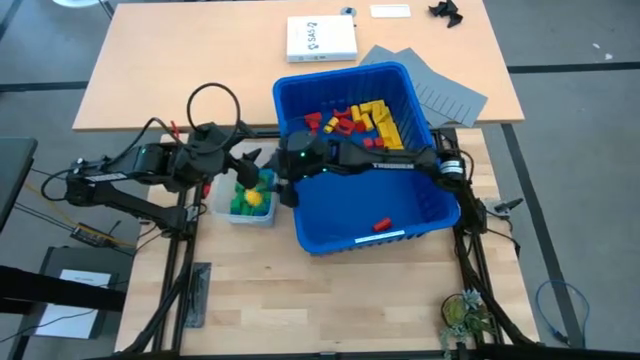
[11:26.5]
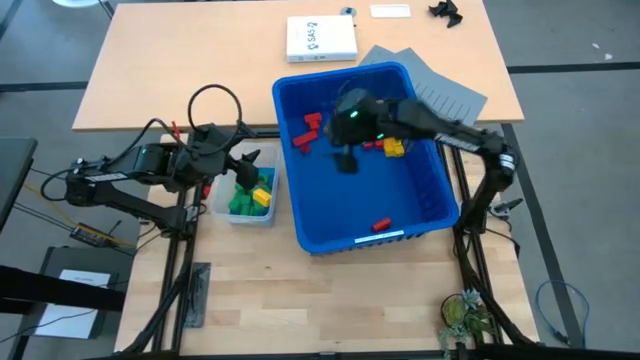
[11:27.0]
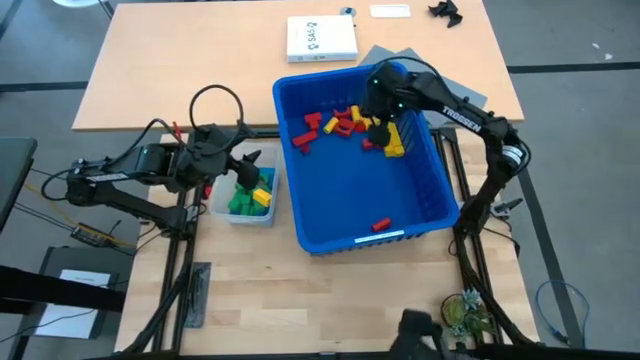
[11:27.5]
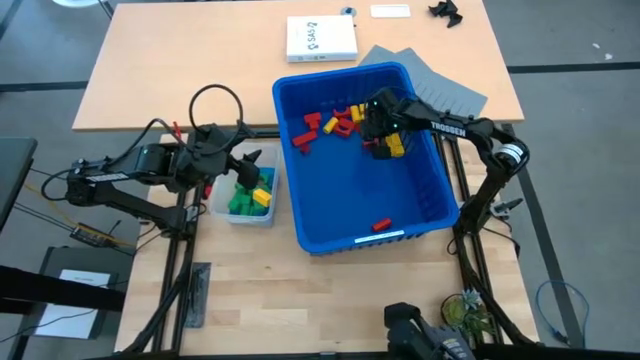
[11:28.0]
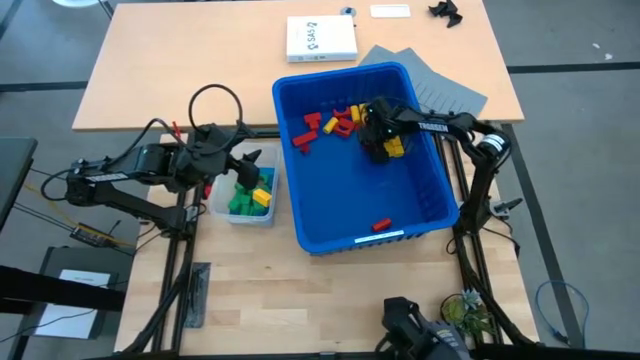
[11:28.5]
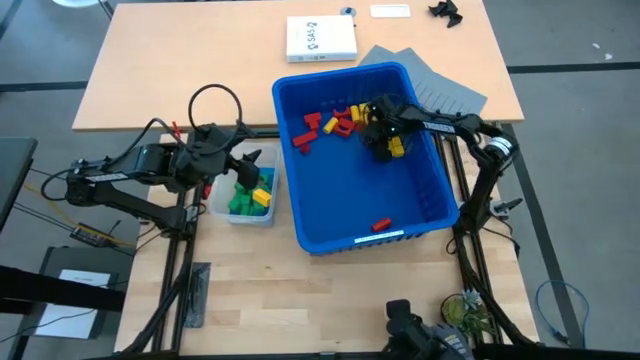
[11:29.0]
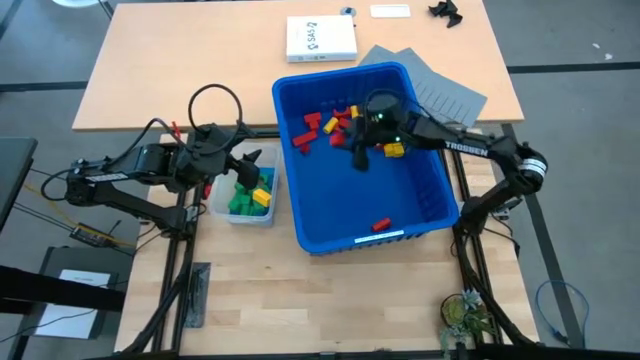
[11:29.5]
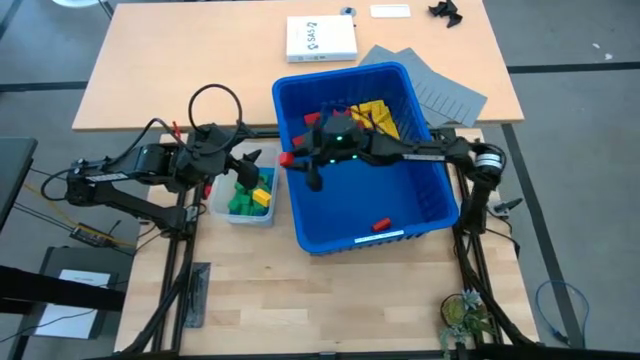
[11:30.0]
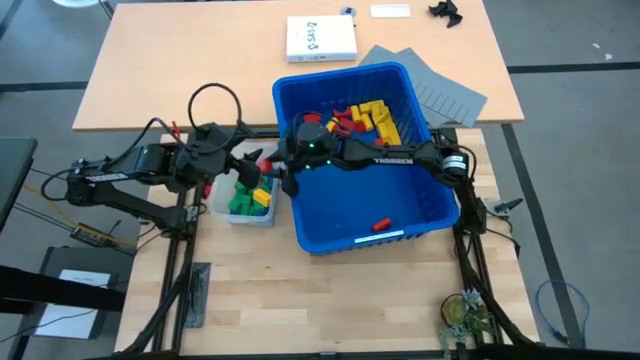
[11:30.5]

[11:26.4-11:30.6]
Task: Sort blocks
Put the red block into the transparent bin

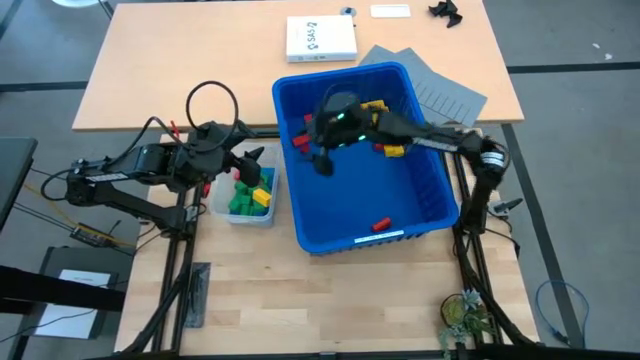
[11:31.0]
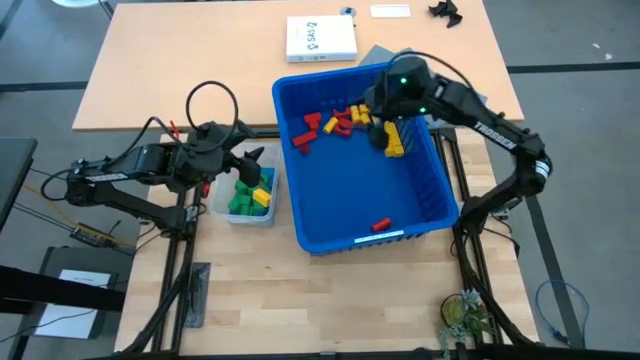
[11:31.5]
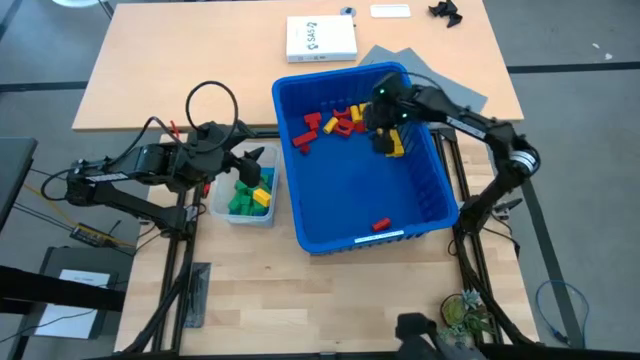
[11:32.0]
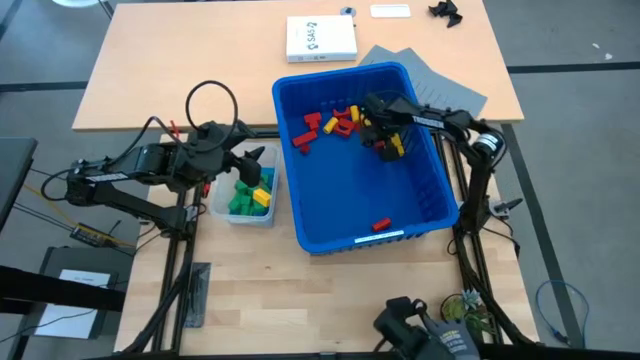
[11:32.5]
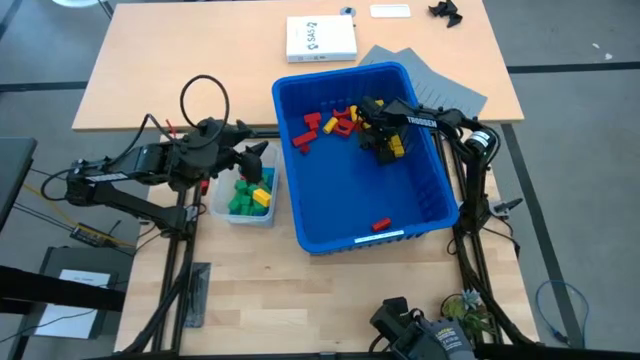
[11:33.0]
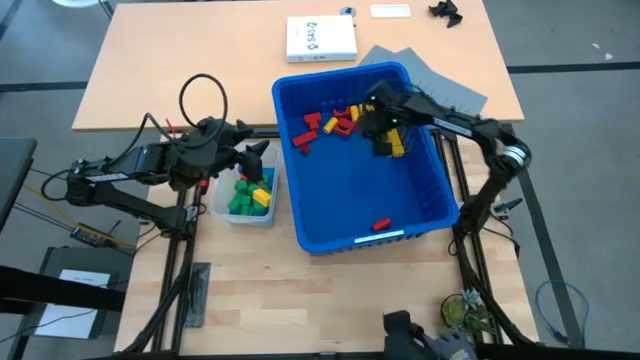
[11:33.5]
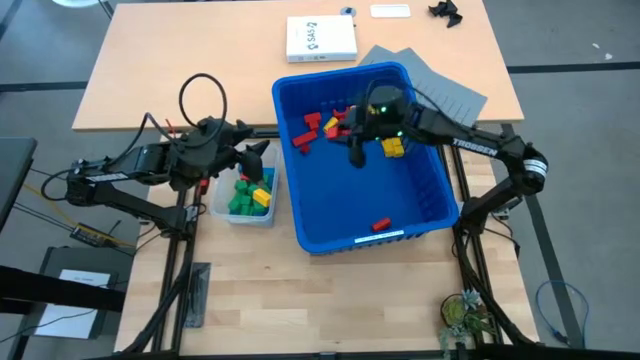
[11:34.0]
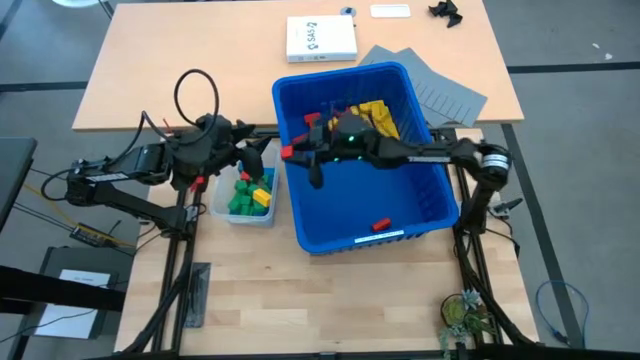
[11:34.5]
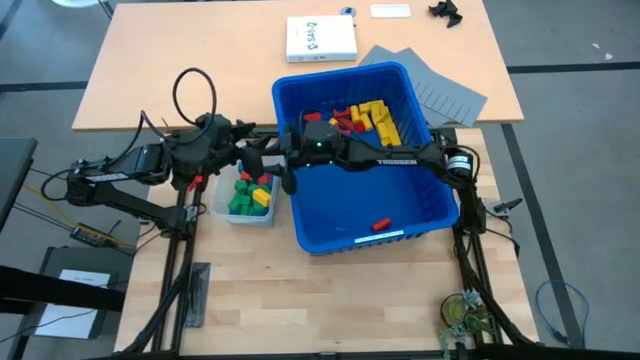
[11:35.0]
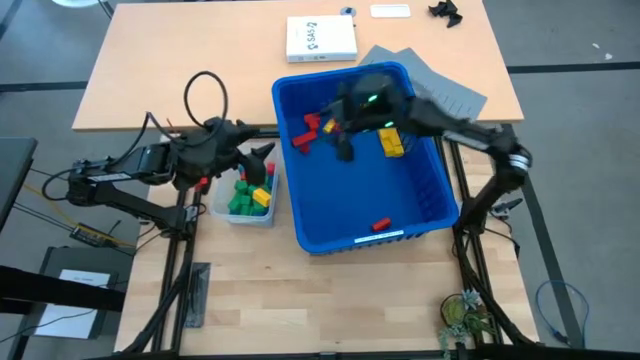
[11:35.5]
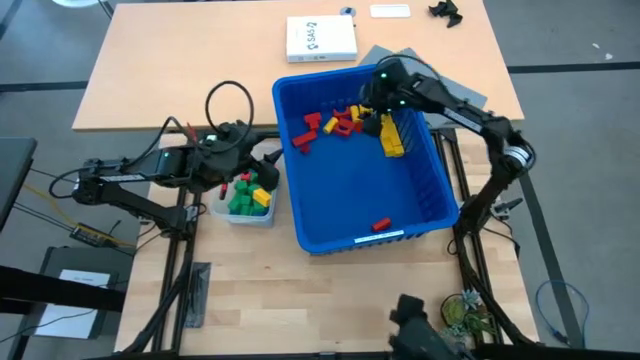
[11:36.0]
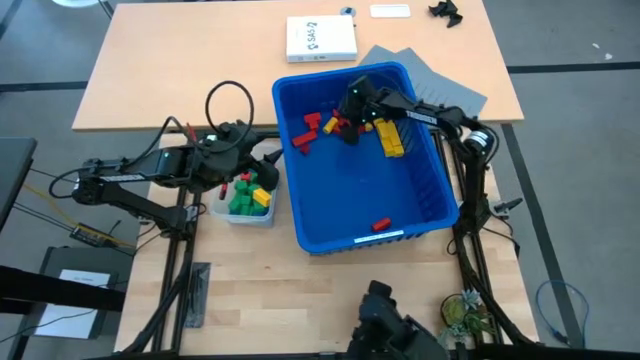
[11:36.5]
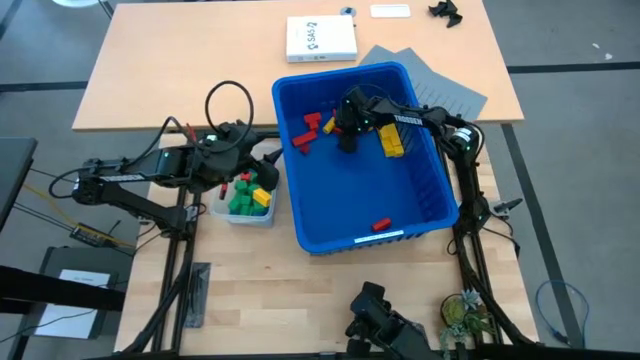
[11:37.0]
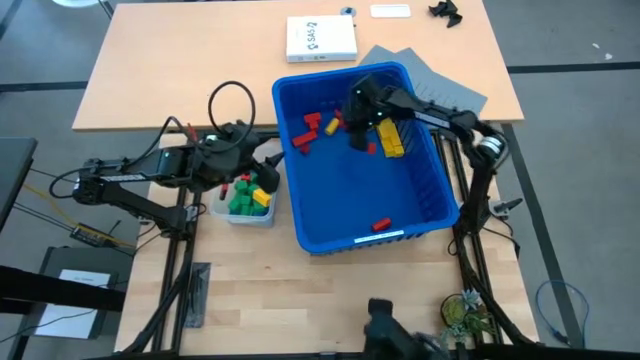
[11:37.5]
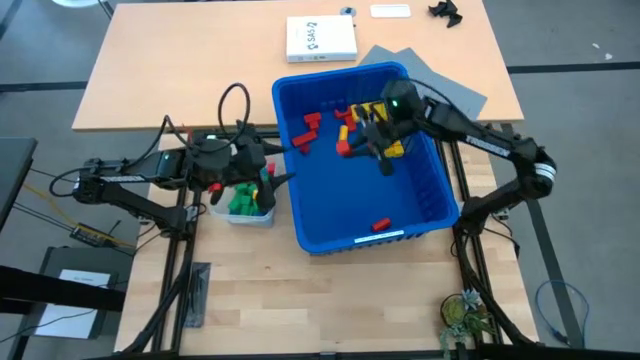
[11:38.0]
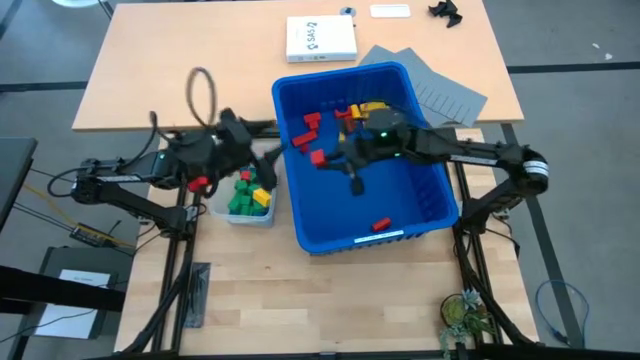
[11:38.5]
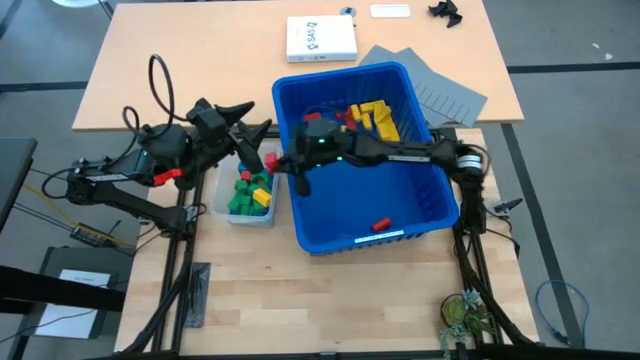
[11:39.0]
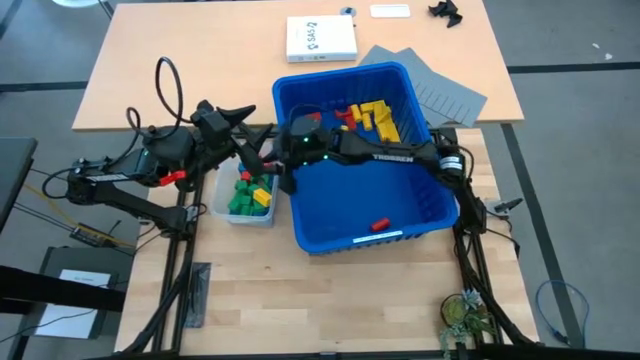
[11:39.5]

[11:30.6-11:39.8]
Put the red block into the transparent bin

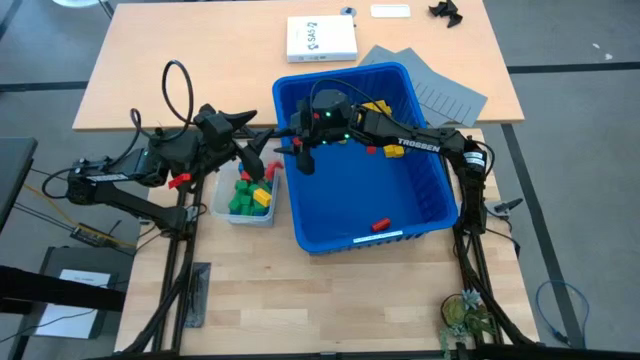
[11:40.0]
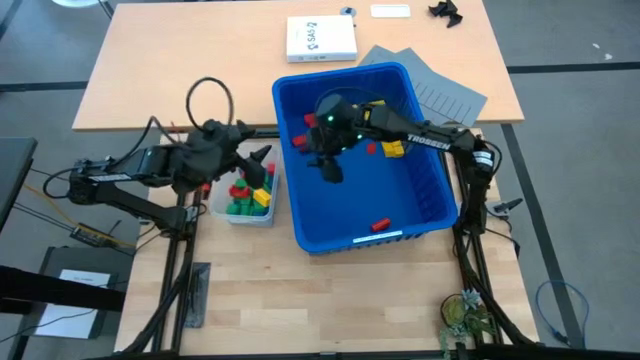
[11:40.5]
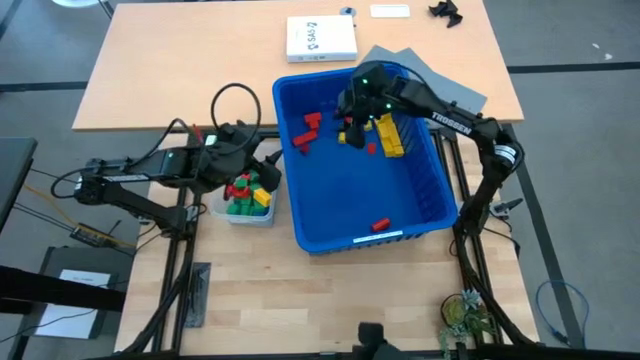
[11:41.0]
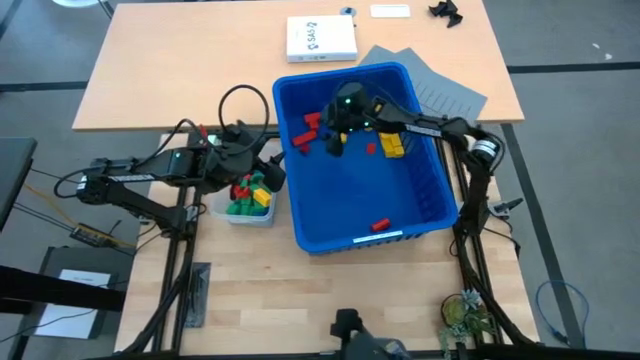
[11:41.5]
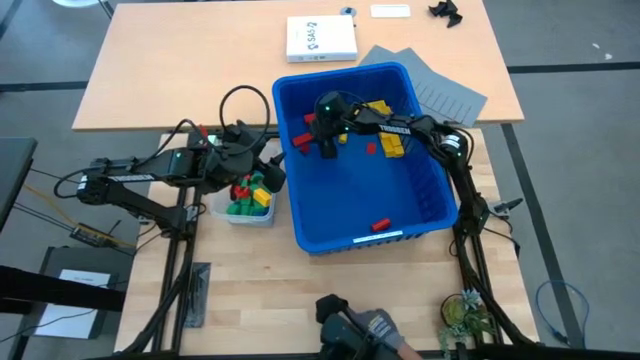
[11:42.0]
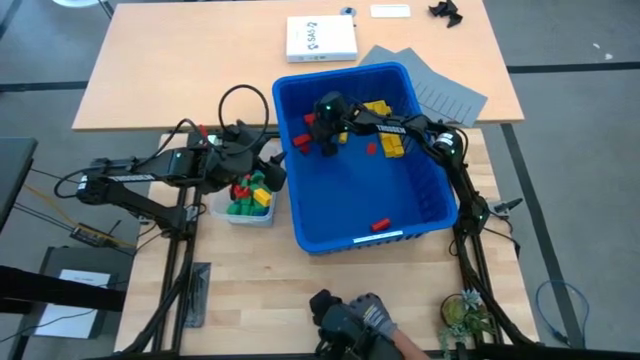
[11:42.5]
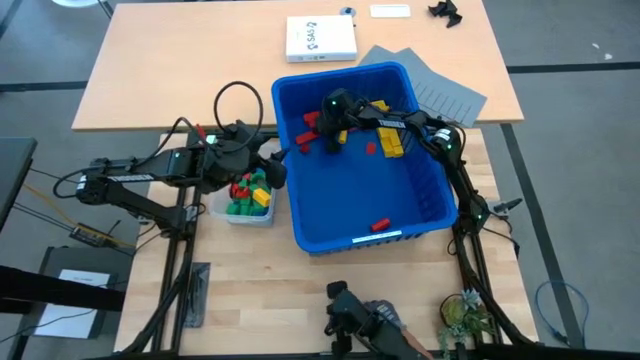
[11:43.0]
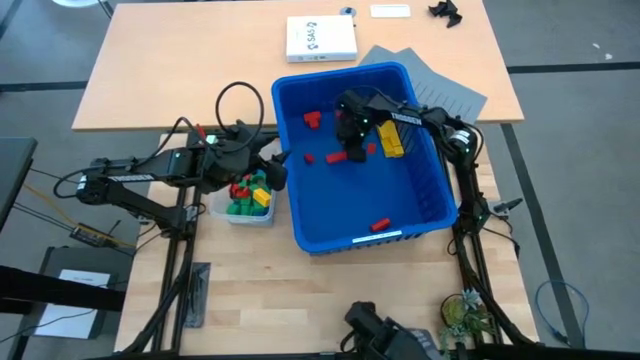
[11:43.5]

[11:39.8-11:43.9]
Put the red block into the transparent bin

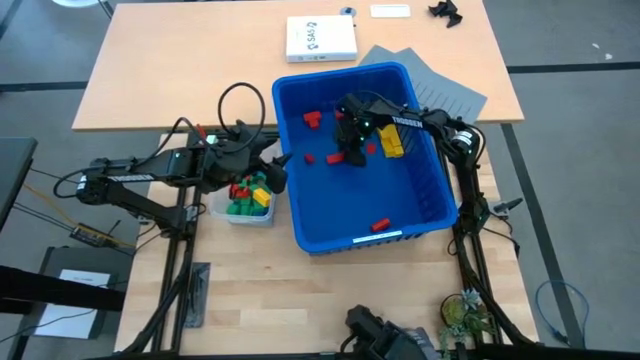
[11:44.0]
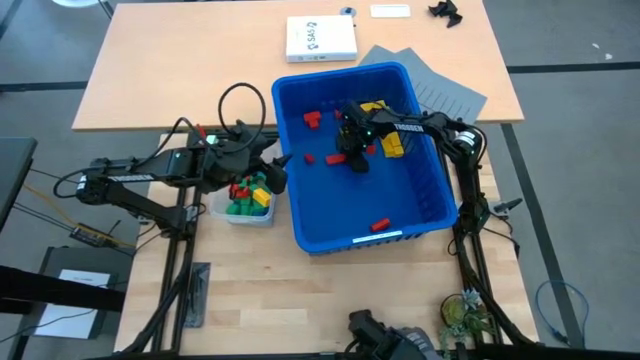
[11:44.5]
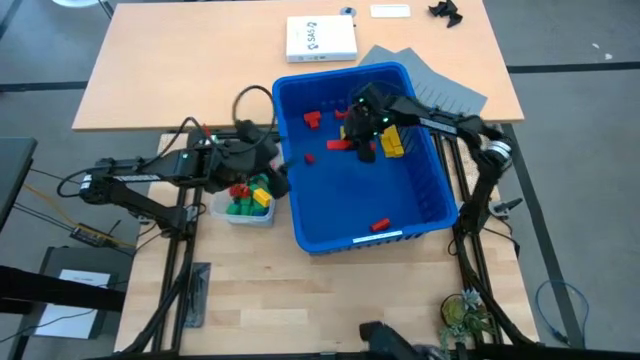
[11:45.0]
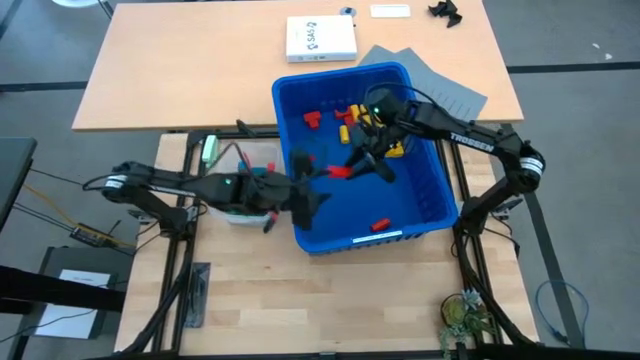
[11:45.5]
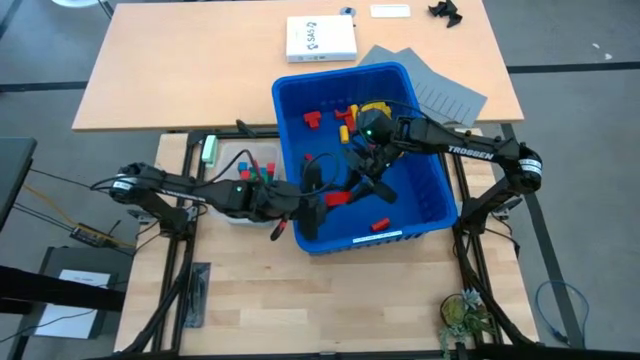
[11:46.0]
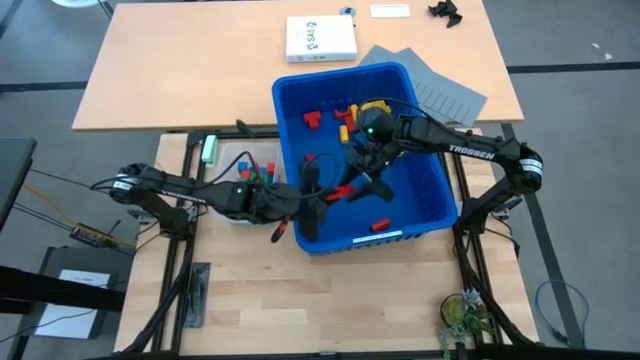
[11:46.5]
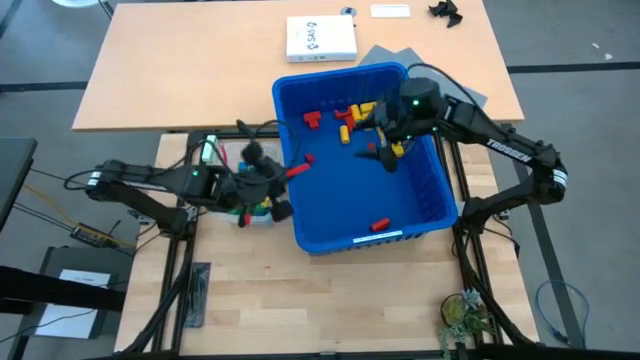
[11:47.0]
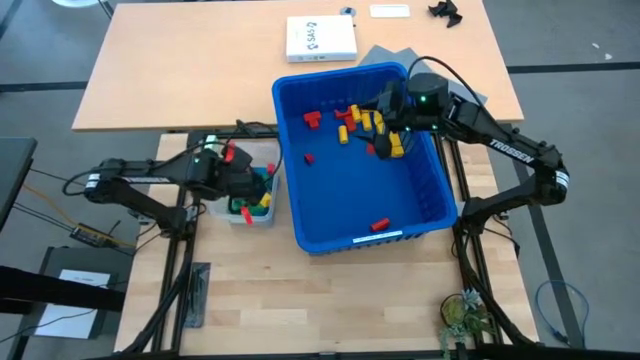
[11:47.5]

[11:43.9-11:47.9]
Put the red block into the transparent bin
